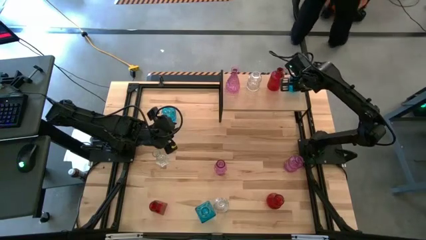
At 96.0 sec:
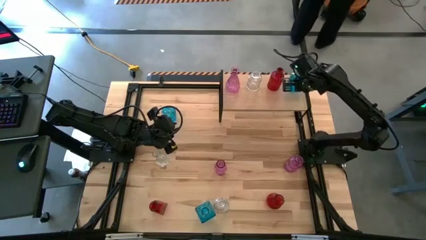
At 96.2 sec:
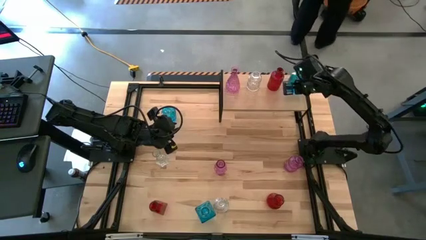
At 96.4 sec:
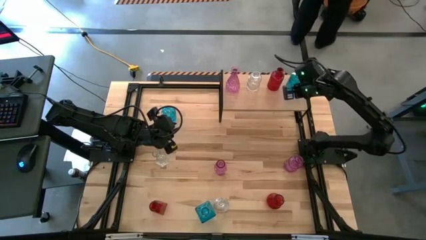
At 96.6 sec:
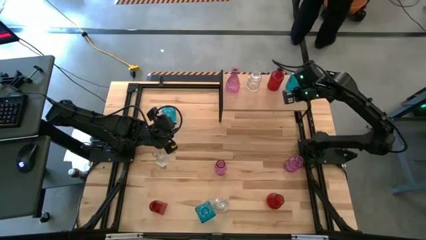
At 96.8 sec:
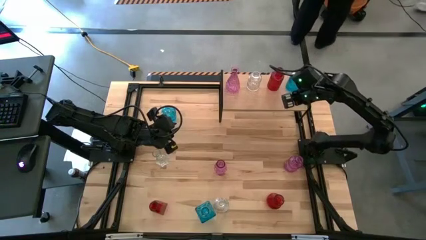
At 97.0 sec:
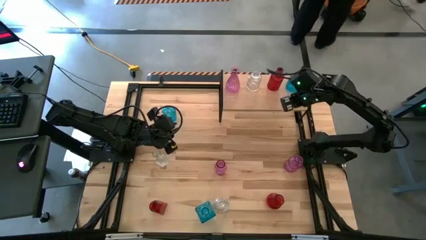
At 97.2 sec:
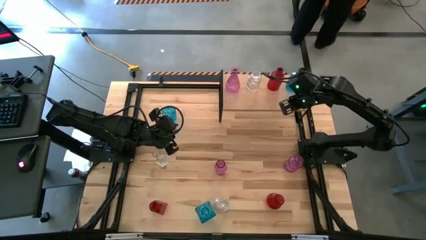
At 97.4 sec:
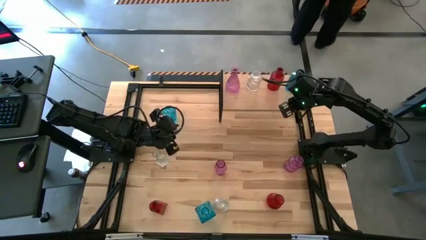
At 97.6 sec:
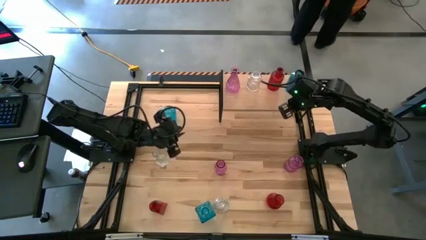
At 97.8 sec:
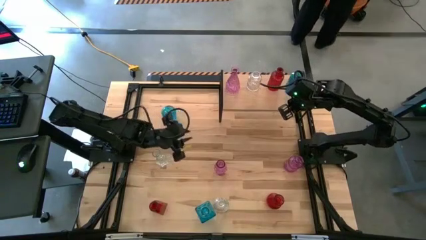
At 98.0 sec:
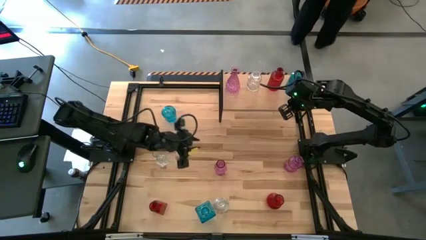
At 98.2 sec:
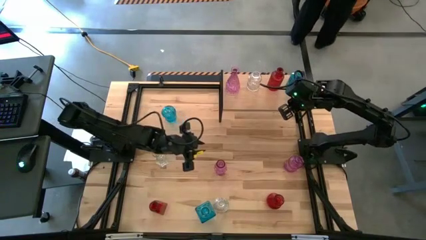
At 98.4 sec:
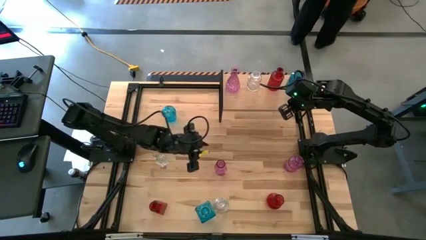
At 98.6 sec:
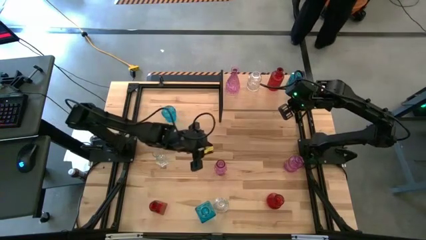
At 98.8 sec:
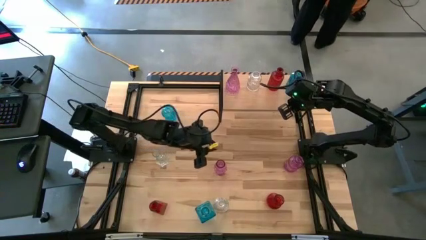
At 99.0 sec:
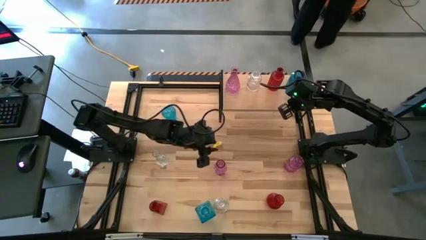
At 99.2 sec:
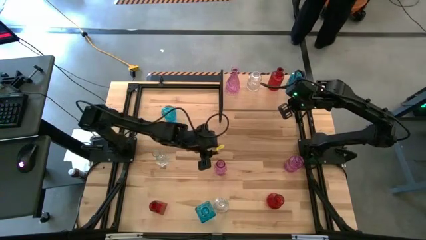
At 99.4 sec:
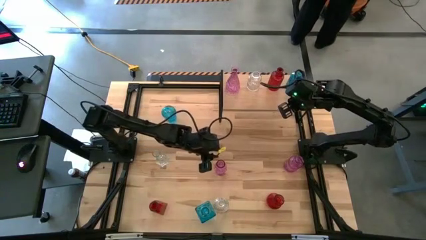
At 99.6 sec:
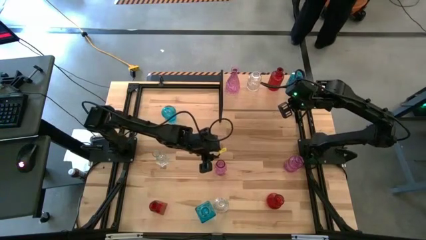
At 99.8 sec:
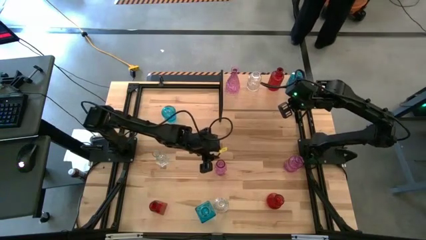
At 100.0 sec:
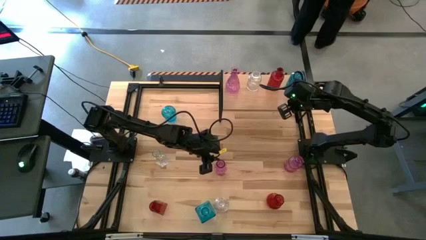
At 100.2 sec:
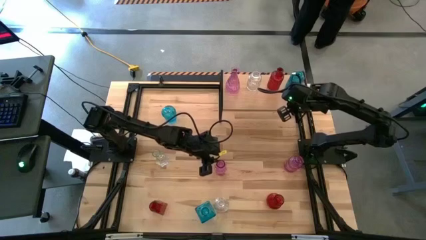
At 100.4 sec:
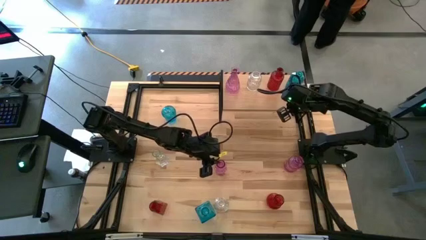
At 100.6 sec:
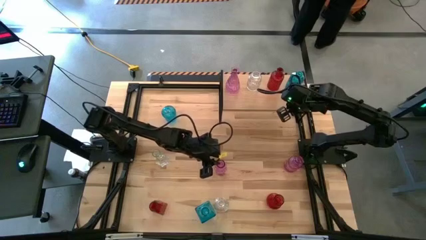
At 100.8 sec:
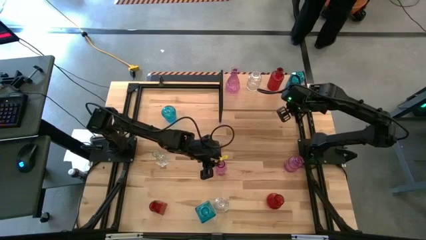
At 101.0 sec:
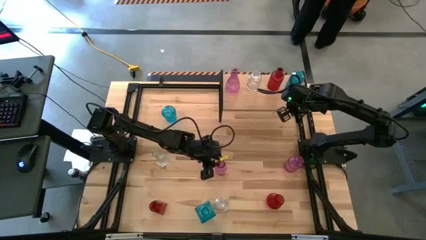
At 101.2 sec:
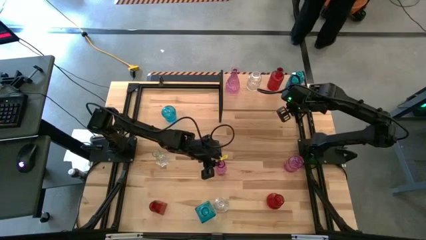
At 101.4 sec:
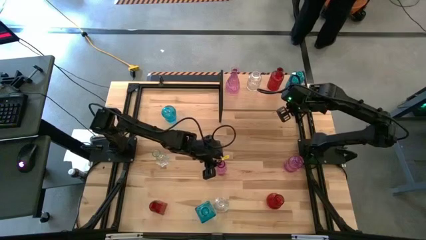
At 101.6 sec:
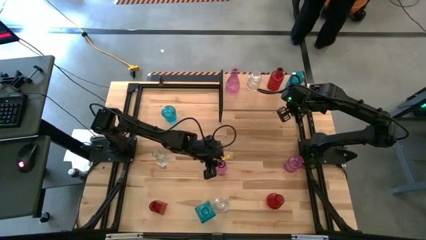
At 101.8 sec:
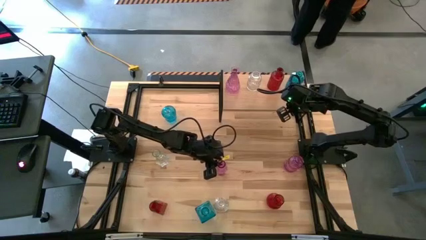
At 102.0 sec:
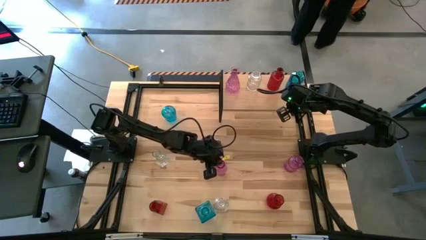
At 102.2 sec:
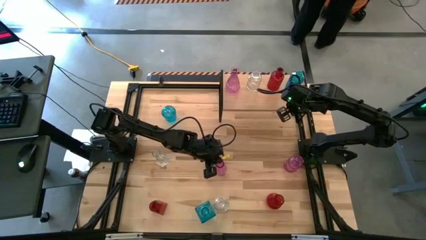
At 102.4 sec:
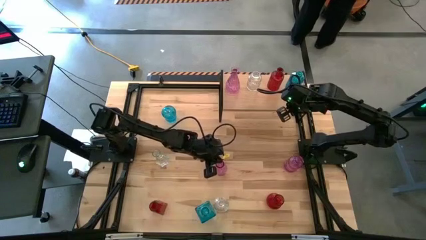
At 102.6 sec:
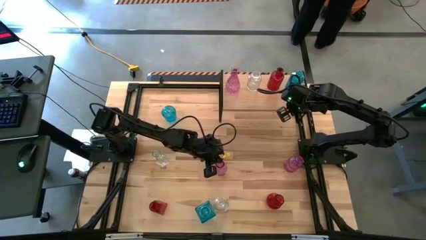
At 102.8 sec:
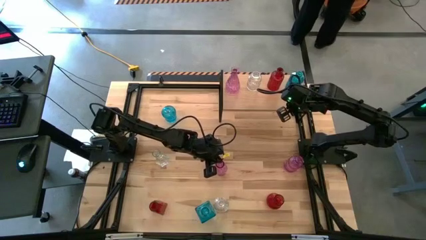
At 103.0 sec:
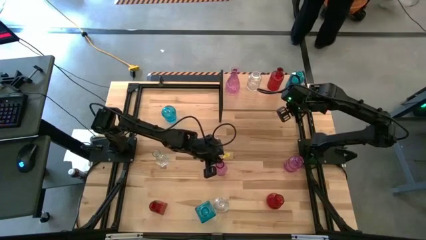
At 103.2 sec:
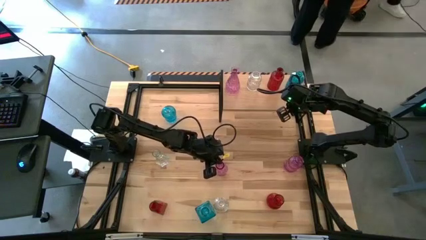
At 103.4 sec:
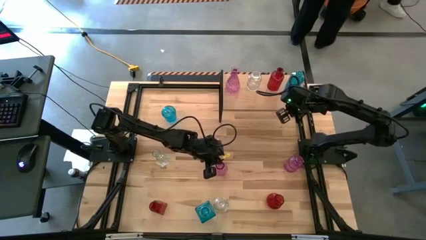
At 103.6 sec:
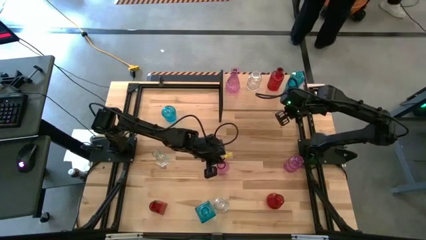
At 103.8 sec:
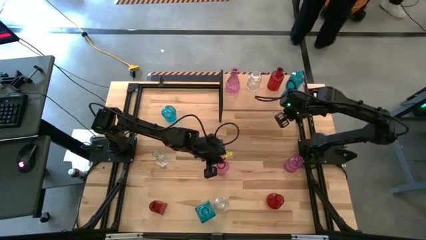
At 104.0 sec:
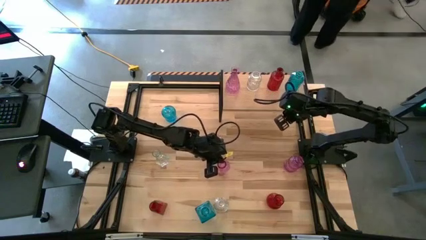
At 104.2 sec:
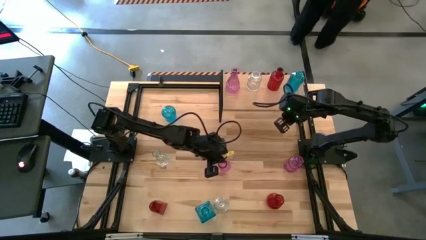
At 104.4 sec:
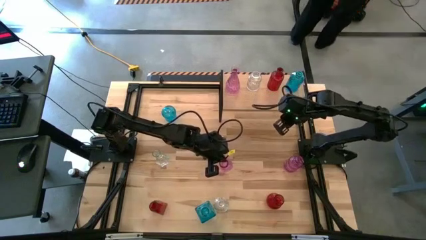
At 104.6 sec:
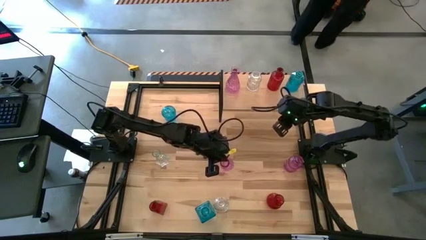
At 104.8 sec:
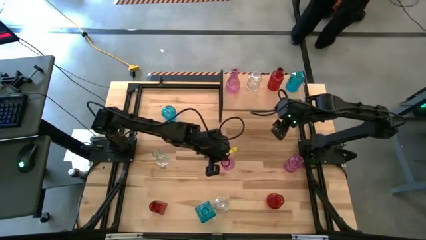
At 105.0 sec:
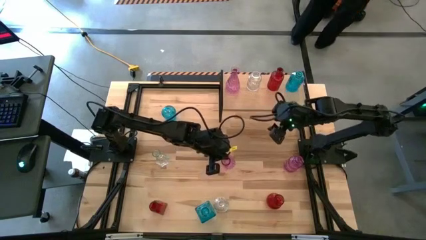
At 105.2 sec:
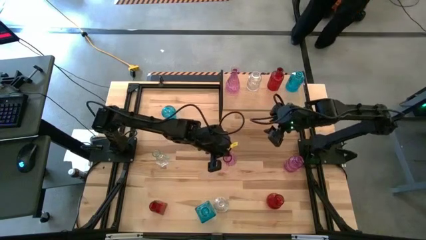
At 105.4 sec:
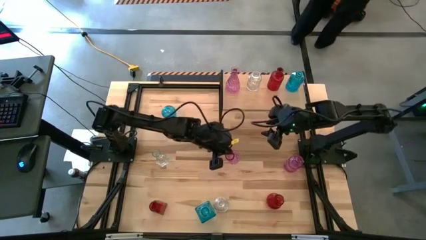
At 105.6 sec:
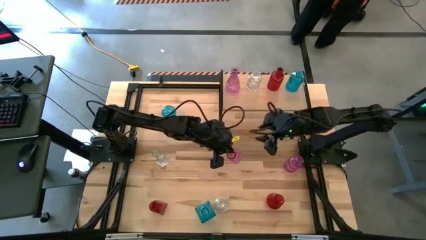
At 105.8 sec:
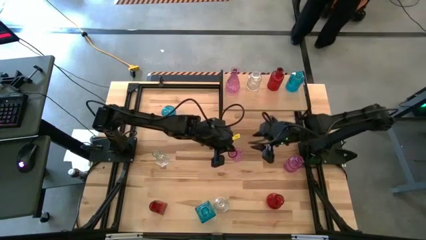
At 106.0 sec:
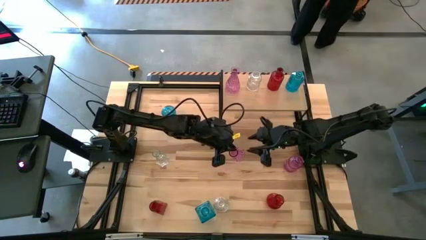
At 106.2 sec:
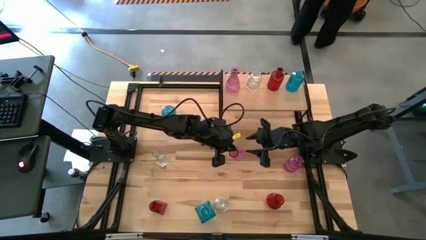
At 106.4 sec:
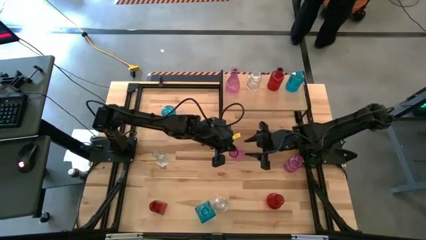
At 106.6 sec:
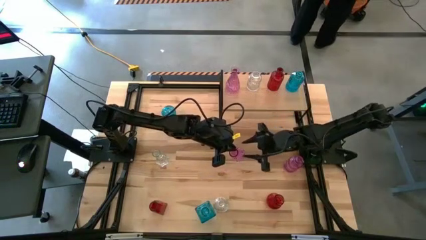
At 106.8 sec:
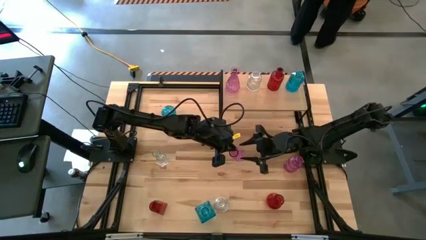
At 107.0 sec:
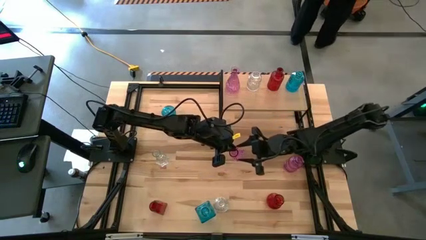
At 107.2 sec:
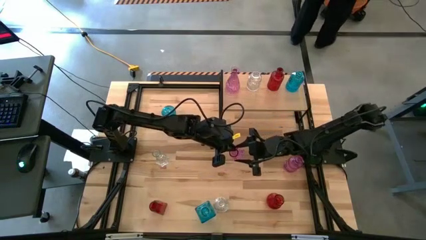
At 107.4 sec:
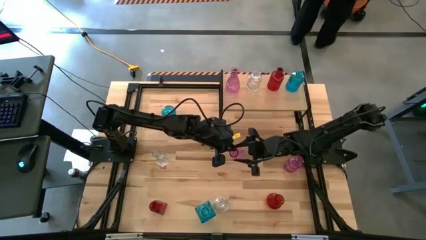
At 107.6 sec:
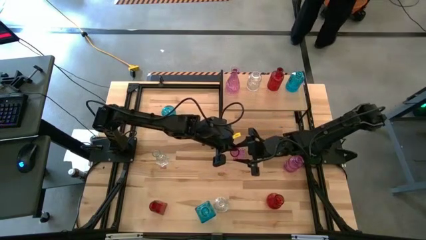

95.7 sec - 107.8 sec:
Task: sort vases onto shelf
Put the left pink vase on the shelf aligned with the other pink vase
